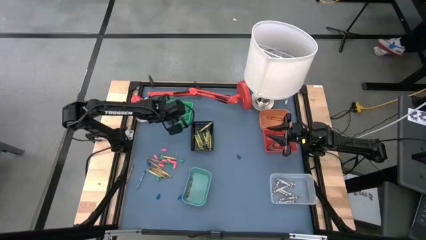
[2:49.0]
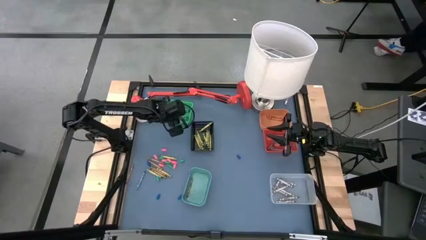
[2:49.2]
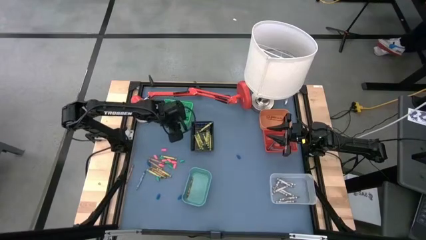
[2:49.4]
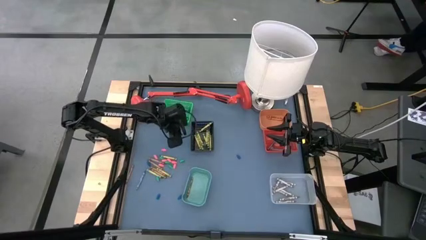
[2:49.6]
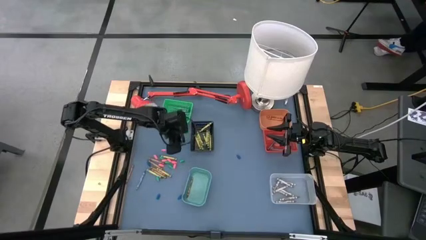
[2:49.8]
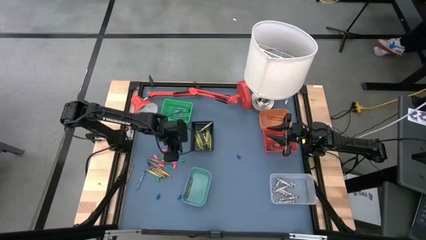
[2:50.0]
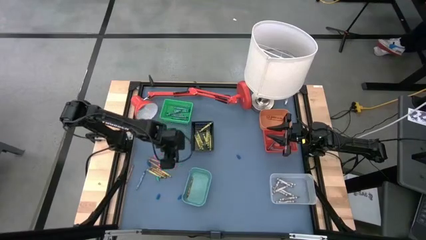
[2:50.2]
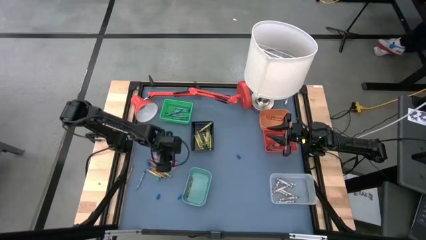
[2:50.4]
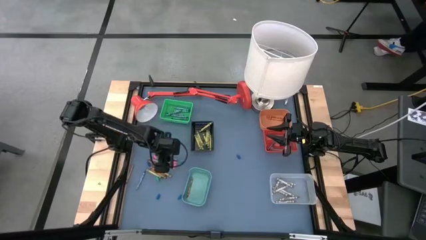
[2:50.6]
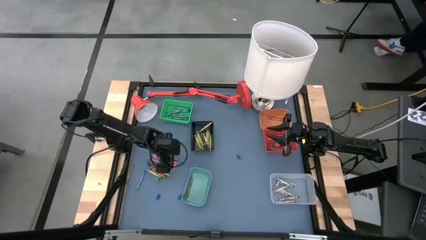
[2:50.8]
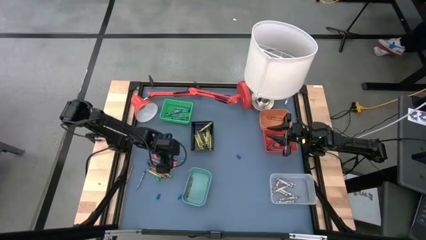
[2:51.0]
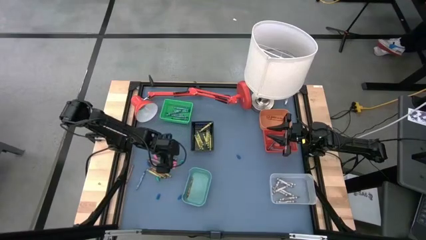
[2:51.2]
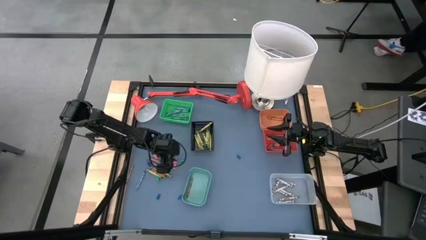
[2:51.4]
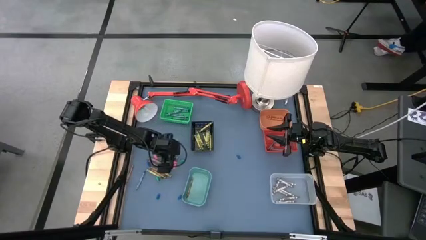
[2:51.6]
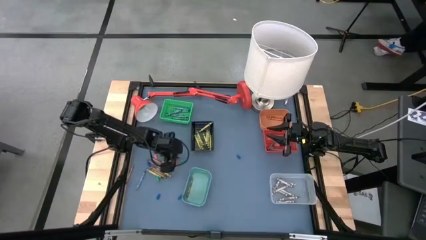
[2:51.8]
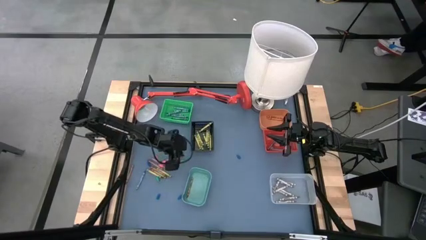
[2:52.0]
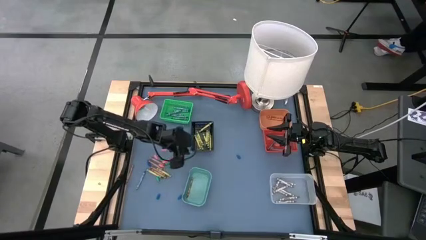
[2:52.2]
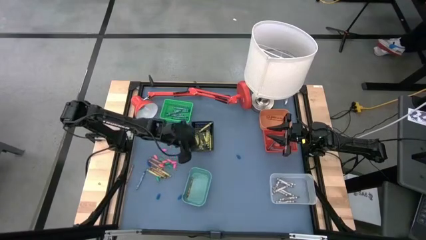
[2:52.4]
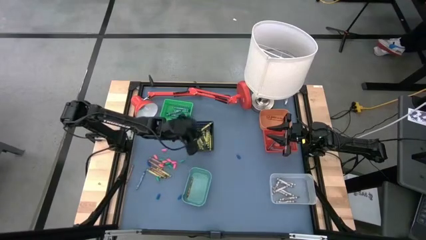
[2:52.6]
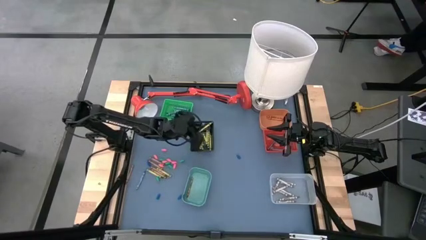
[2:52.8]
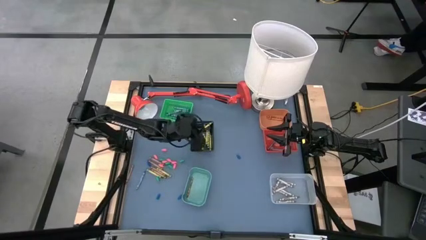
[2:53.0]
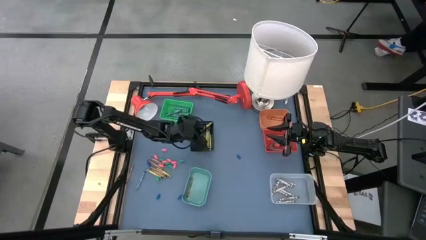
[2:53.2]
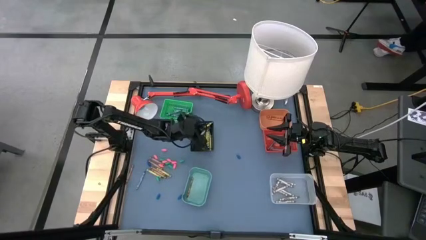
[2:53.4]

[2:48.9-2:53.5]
Task: Sort crayons
Put the green crayon into the black bin

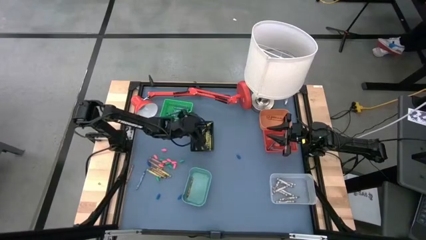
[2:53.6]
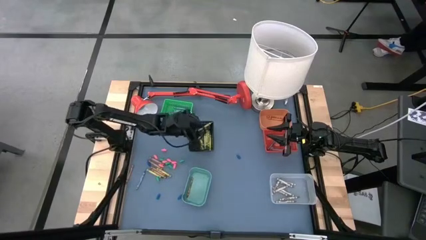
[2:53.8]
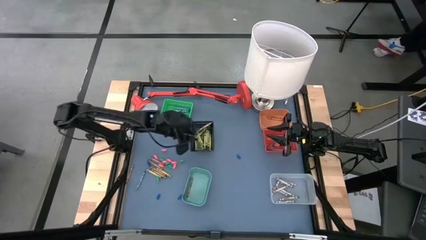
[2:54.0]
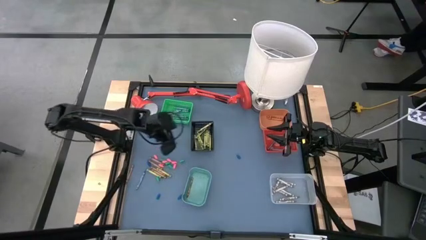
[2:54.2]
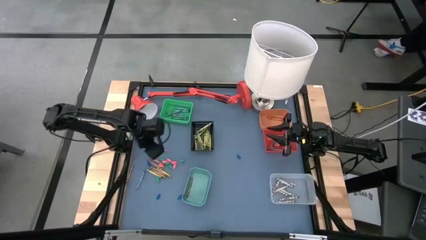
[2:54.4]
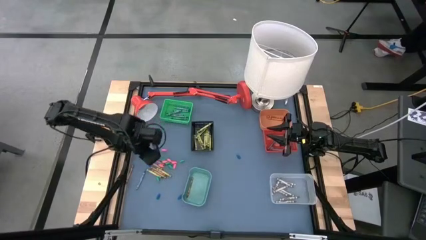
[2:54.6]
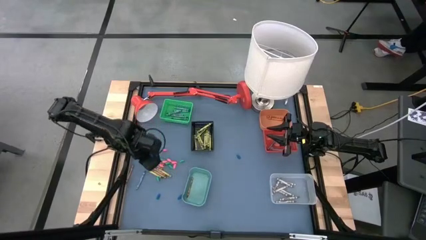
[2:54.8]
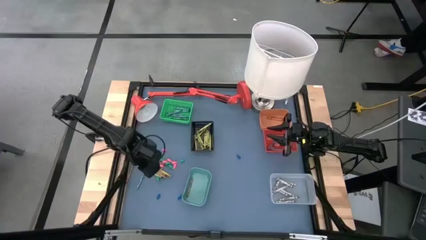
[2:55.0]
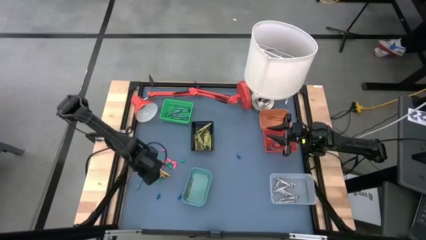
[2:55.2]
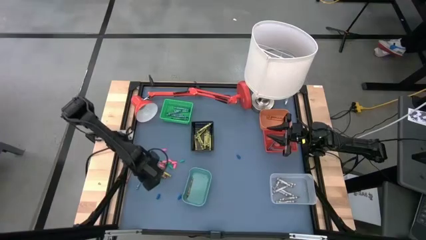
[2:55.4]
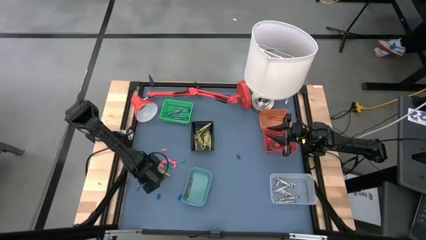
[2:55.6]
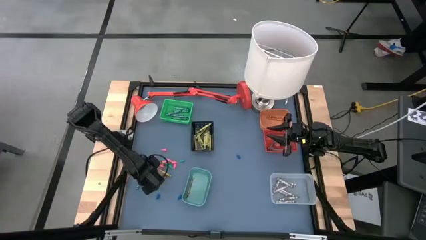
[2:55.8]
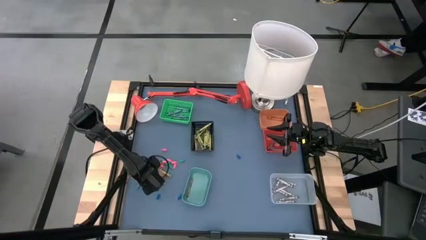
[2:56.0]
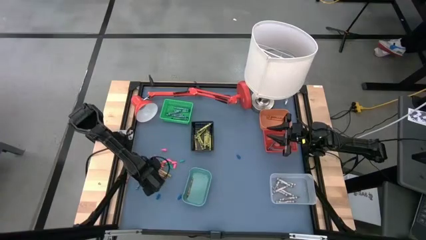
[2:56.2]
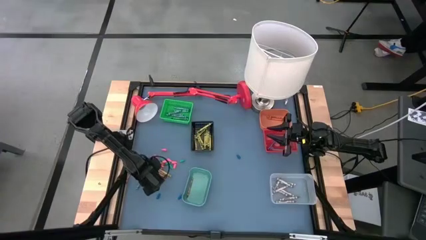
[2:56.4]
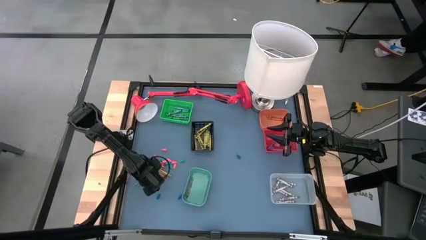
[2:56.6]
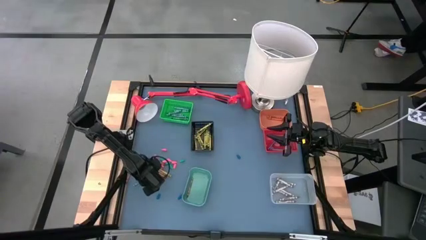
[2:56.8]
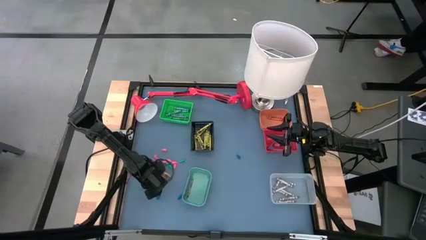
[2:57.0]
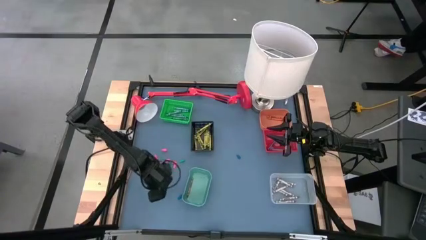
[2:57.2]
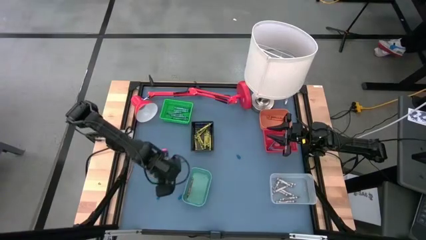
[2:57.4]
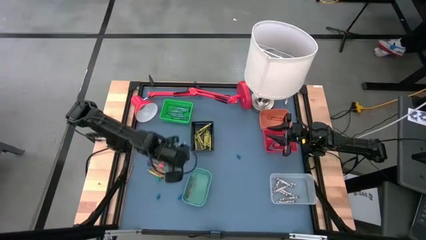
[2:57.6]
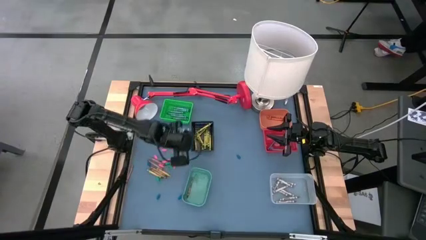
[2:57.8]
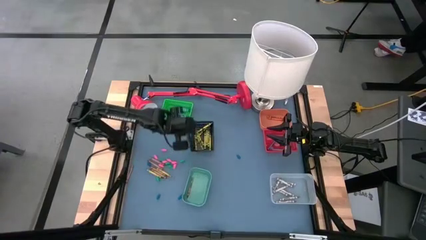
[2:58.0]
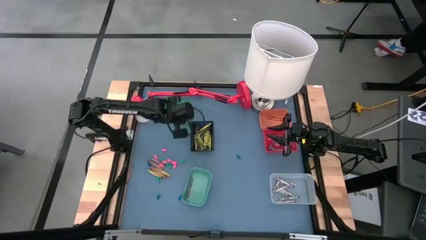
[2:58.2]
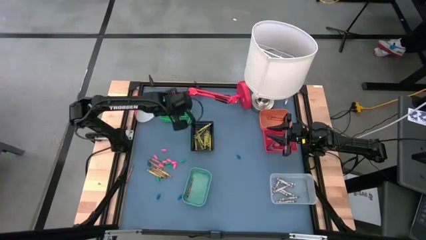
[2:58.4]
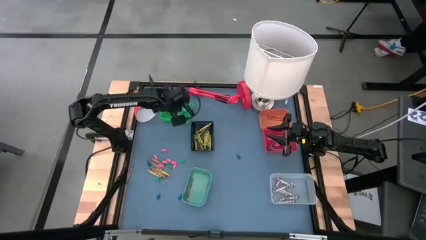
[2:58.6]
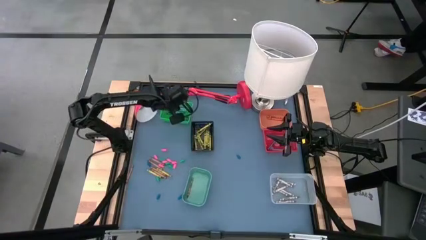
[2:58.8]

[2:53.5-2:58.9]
Put the blue green crayon into the green bin

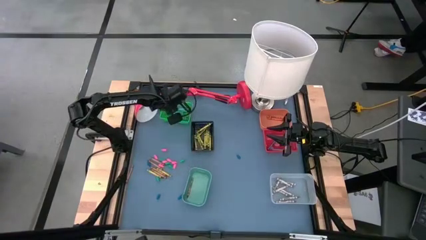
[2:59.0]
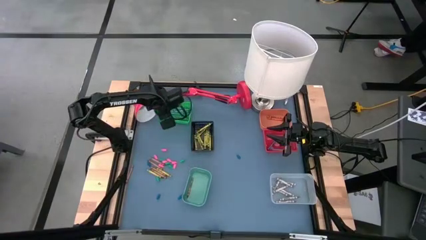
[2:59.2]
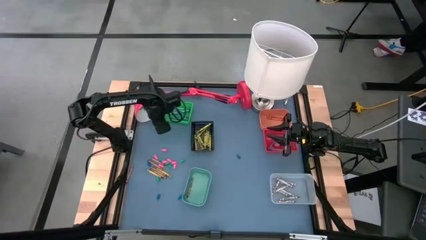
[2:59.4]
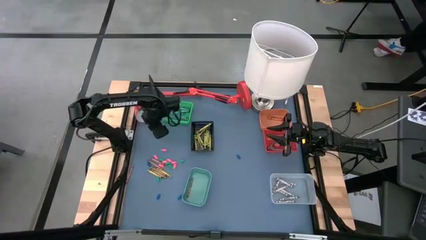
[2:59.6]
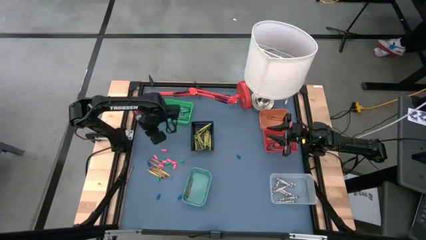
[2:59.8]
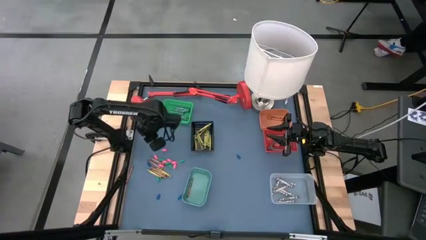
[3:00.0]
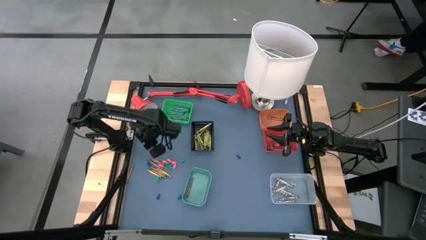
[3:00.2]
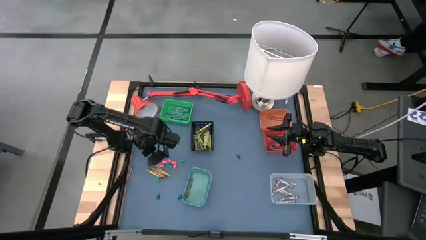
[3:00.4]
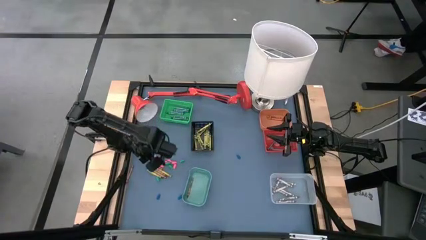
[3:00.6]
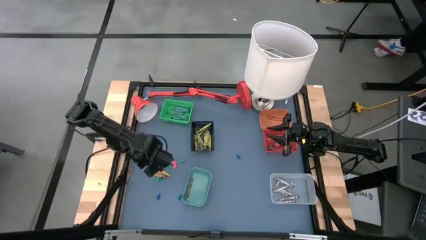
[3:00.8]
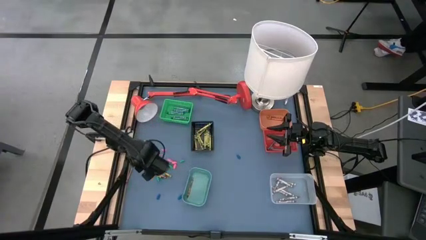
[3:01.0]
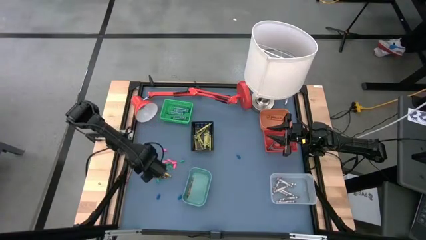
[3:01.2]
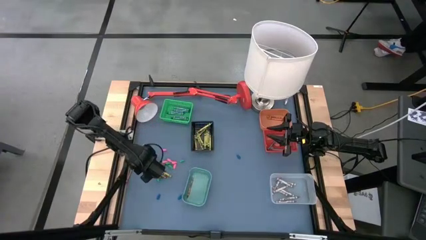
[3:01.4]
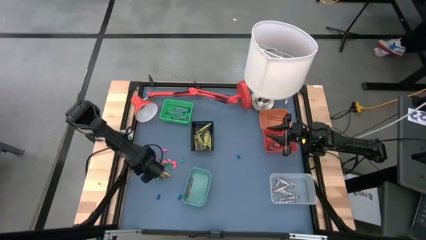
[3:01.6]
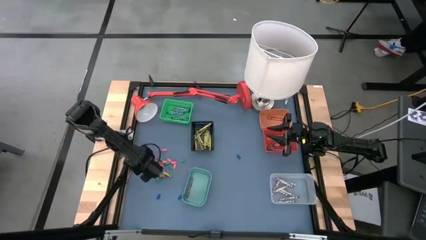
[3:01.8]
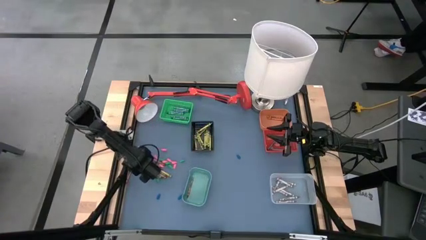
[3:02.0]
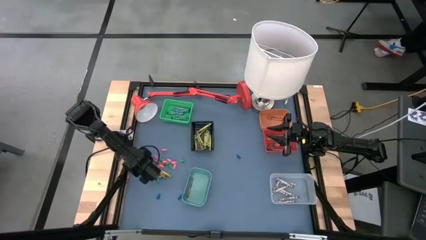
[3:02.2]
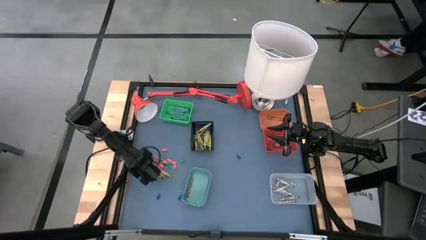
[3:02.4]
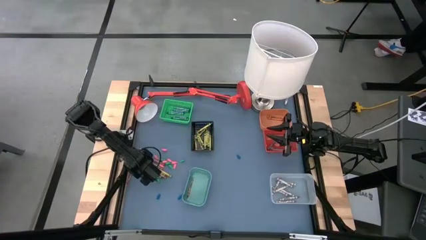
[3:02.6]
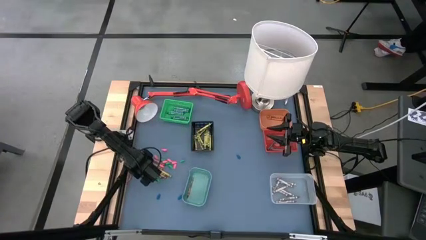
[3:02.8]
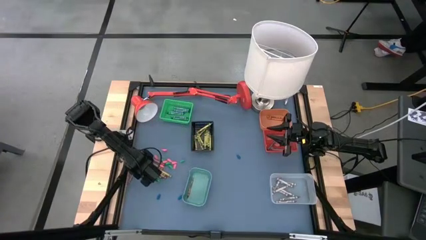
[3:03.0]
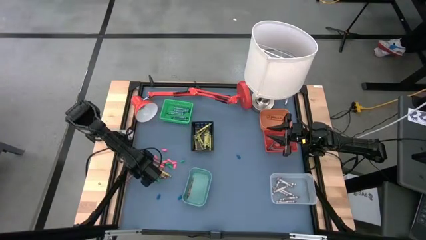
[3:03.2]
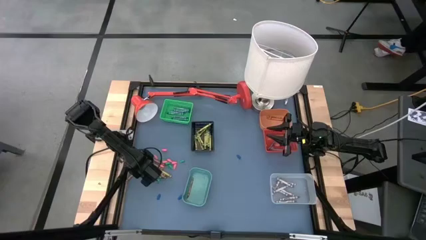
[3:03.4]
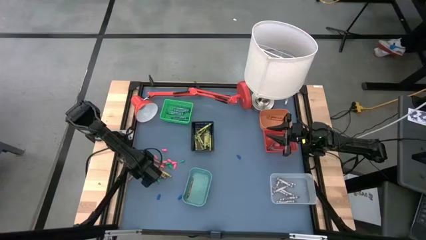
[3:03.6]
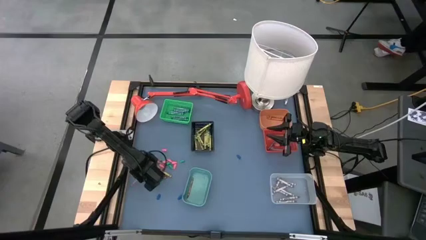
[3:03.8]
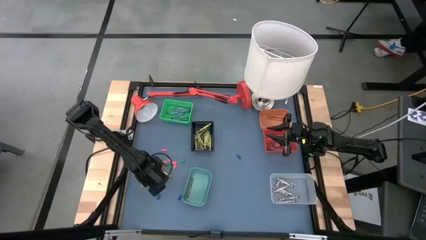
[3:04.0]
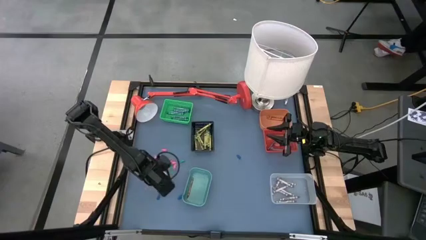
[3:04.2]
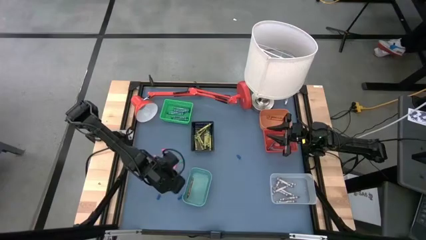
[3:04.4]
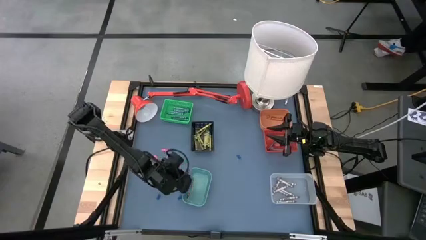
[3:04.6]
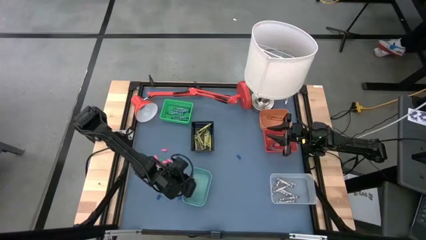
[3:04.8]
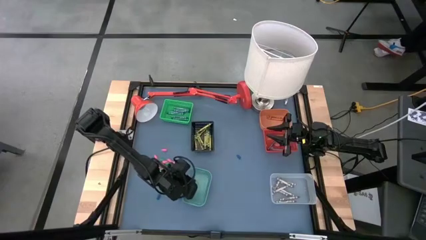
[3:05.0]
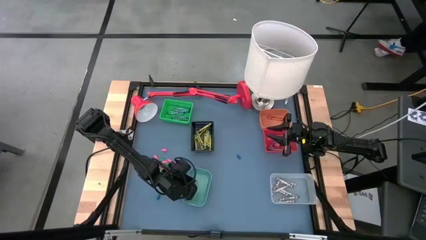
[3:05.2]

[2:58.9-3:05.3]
Put the brown crayon into the light green bin
